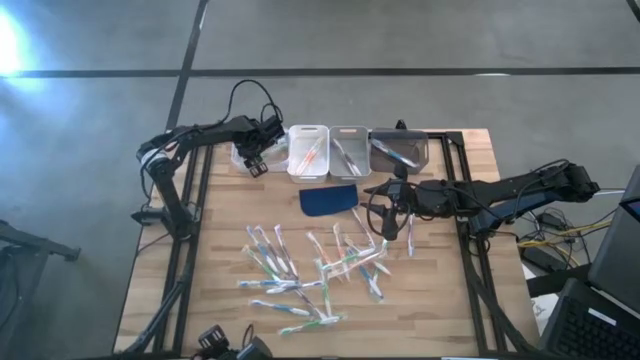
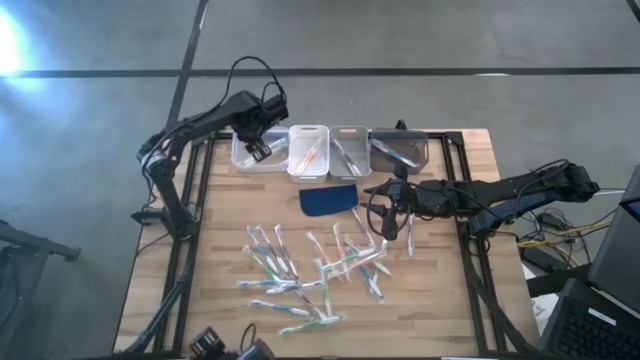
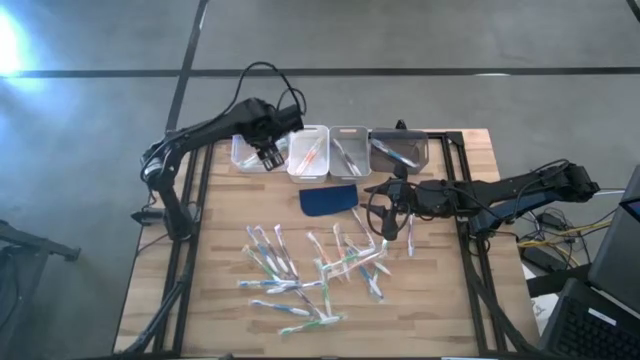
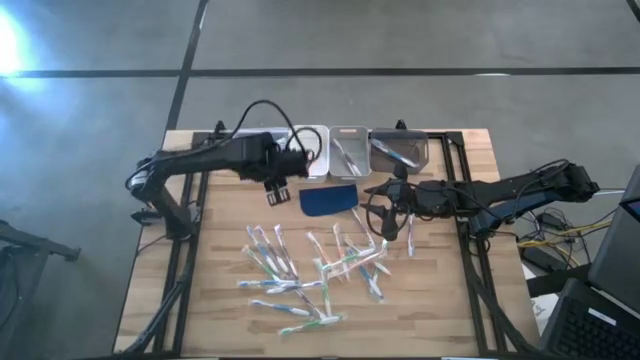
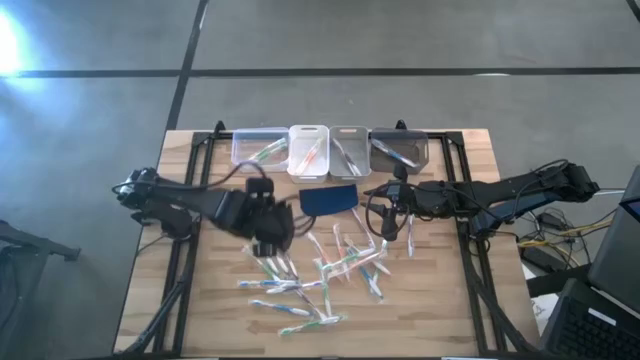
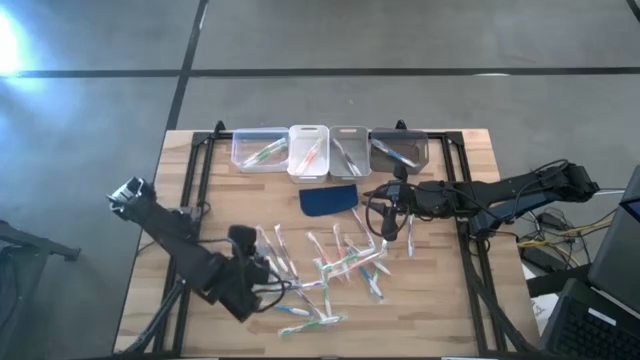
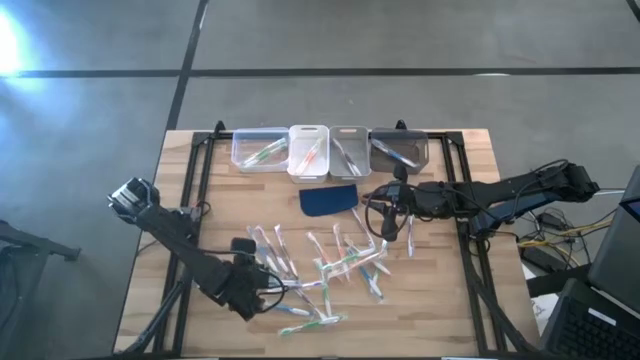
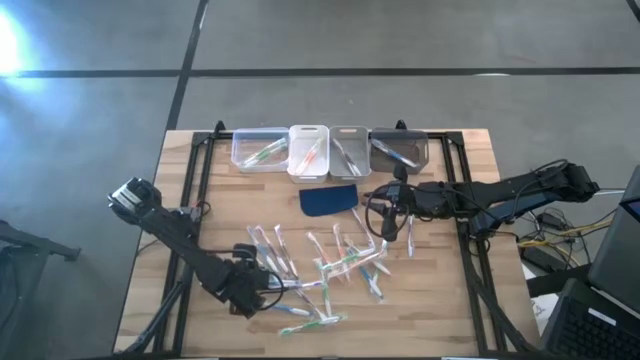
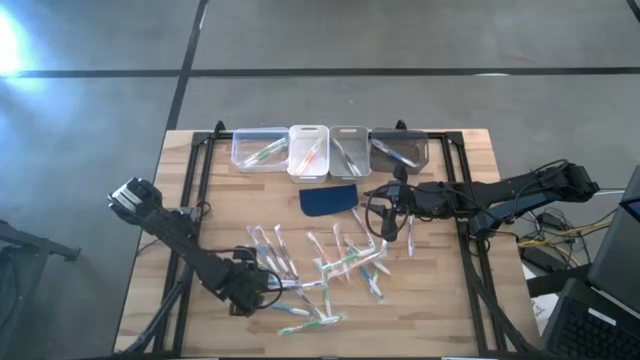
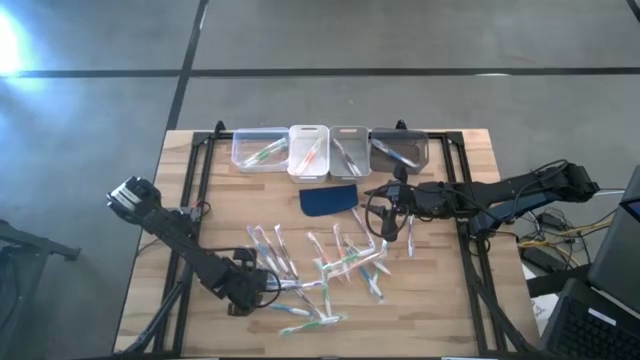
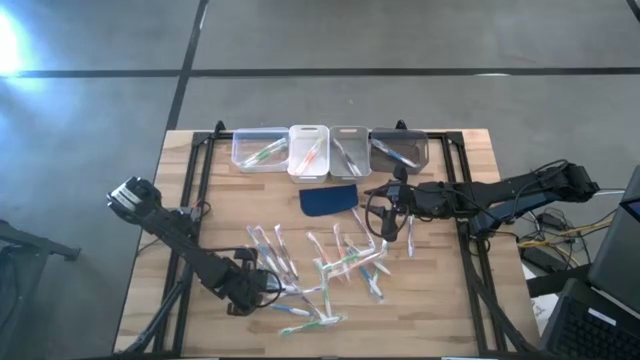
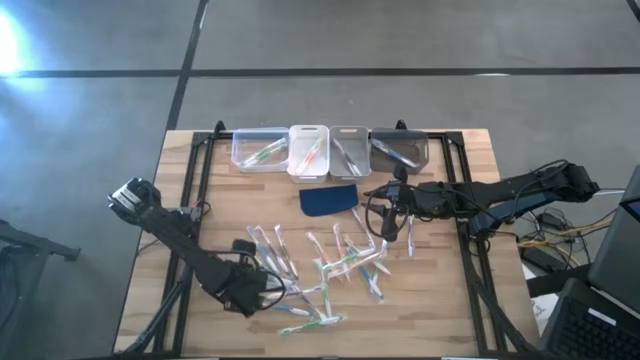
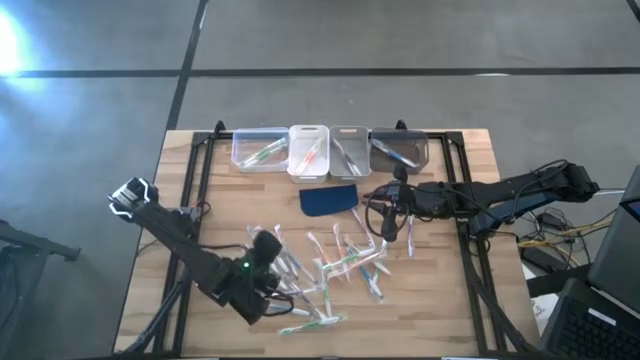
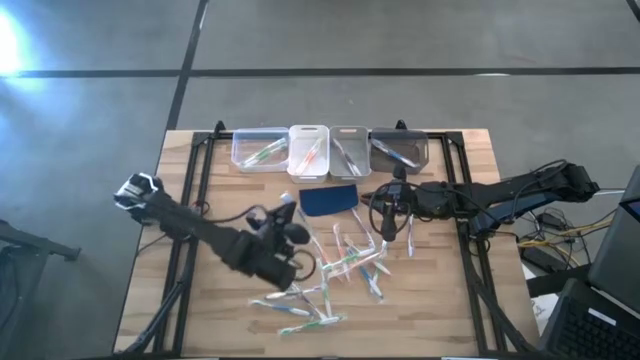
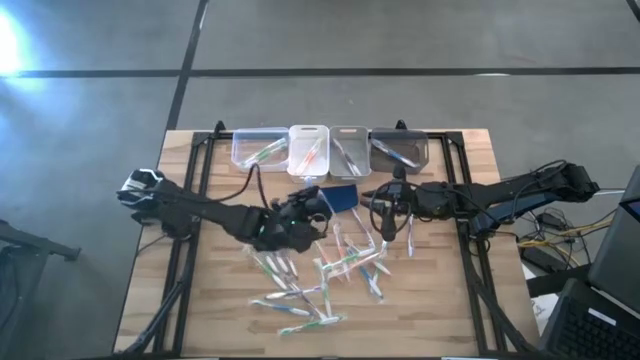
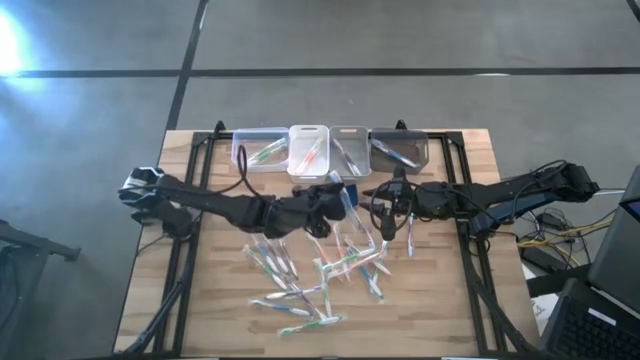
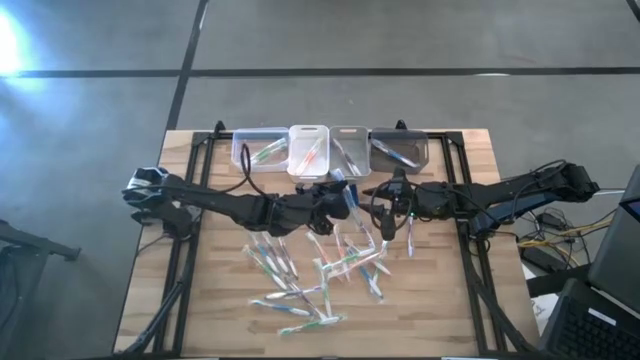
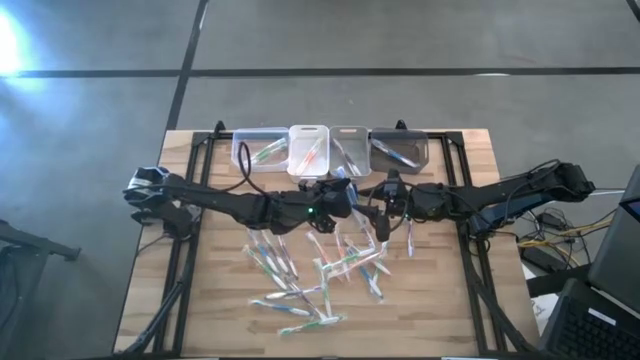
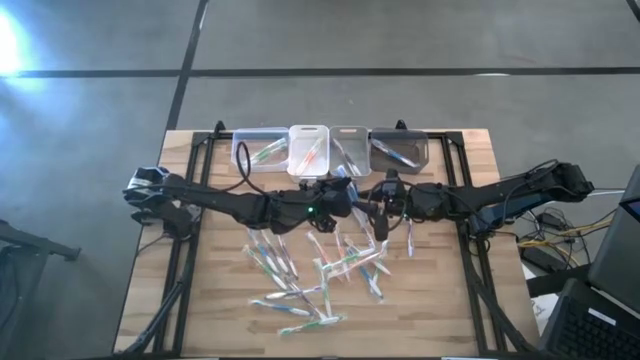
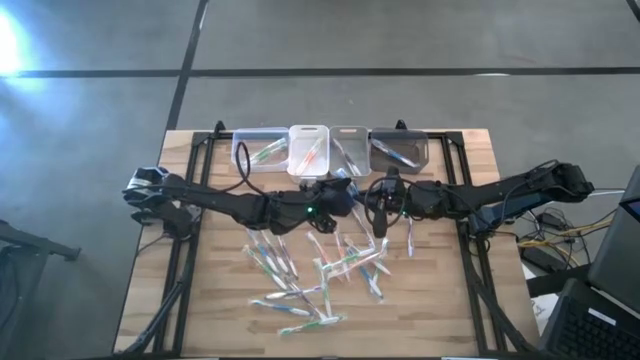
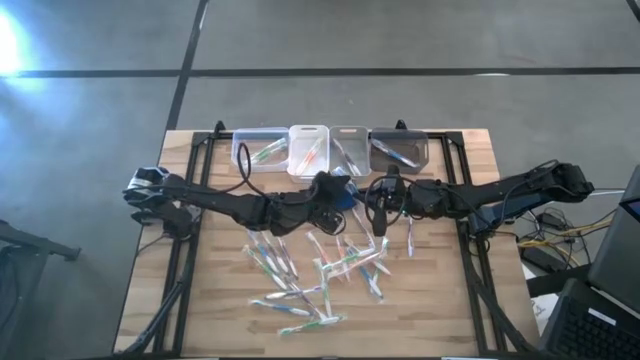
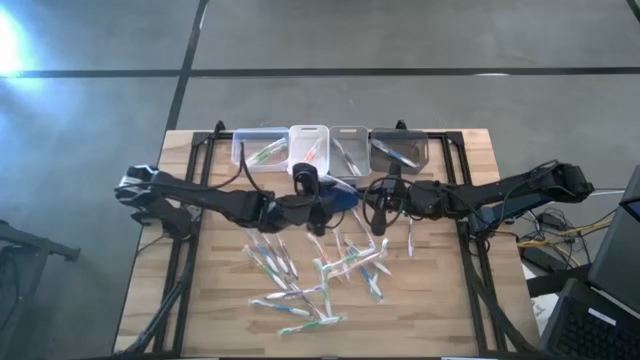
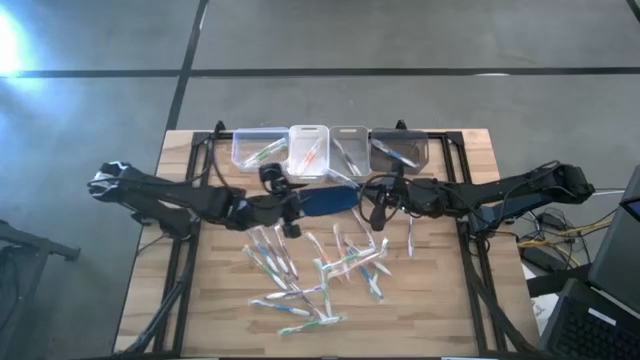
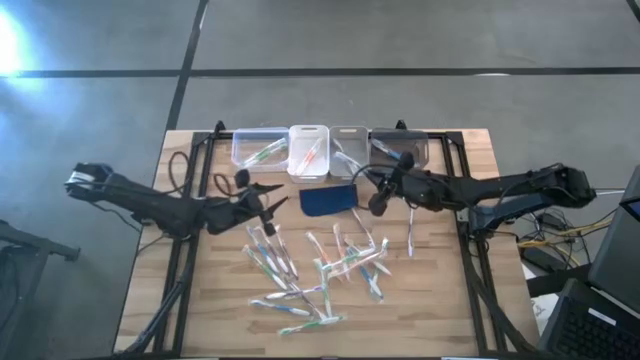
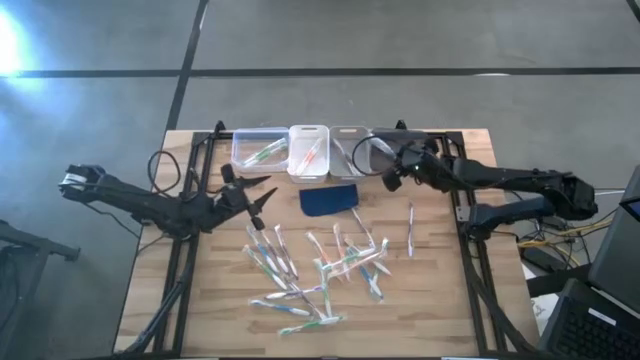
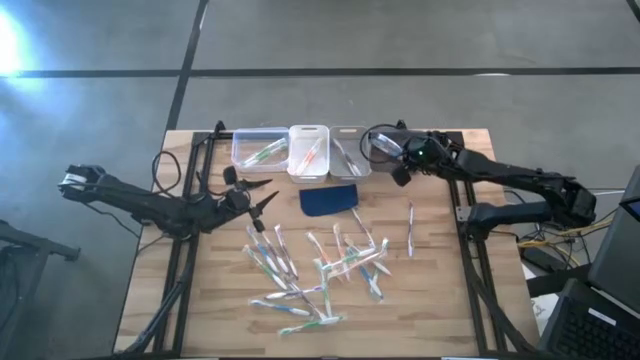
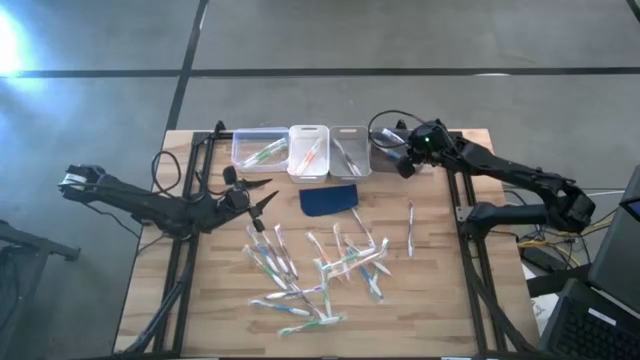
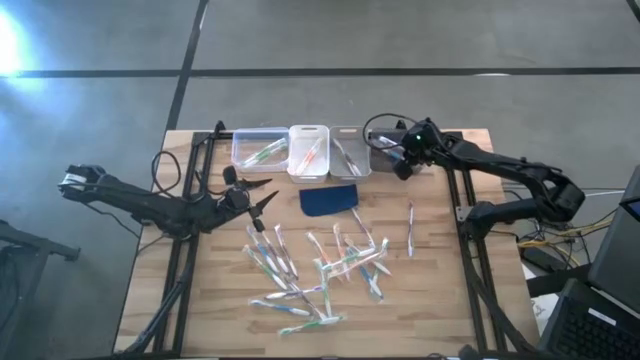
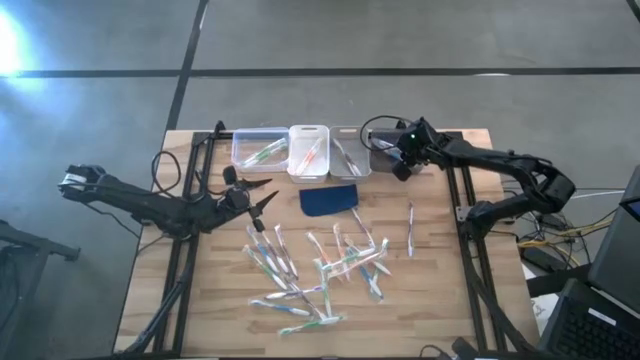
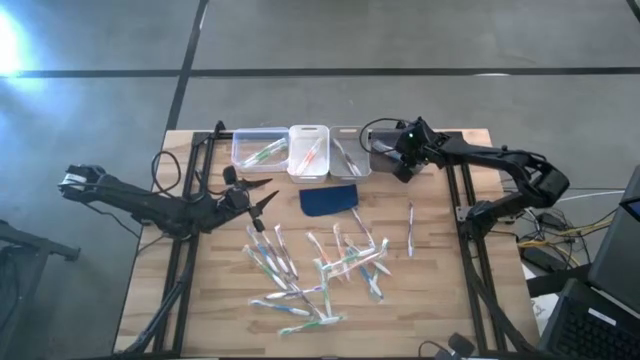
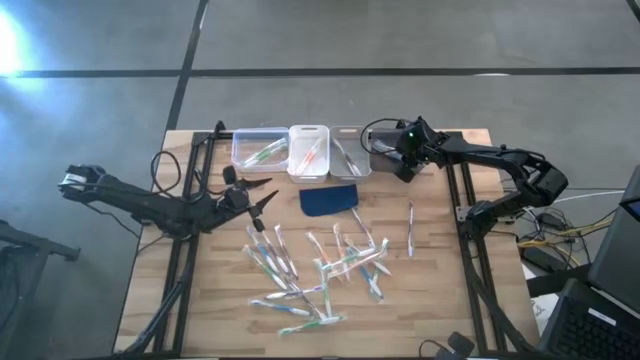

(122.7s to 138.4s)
Task: Pick & Place Toothbrushes
Put the blue toothbrush into the transparent black bin

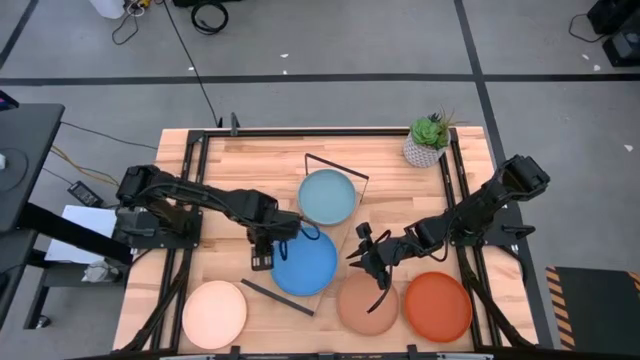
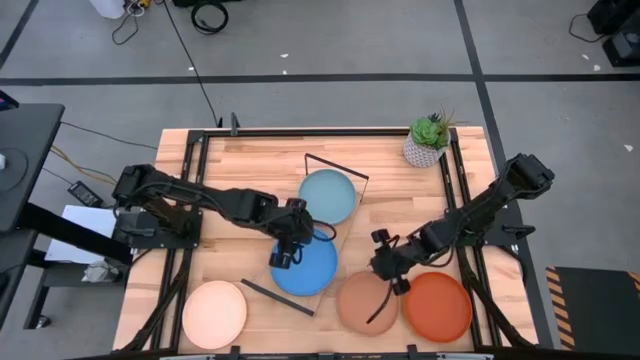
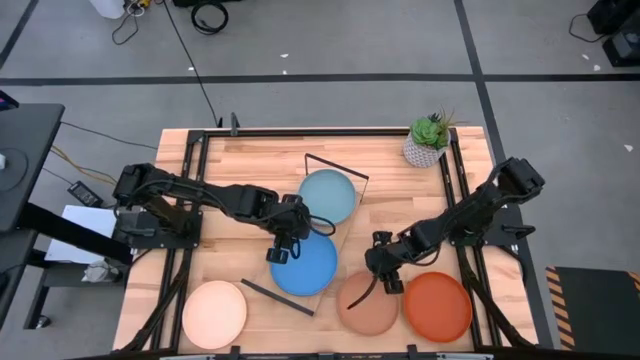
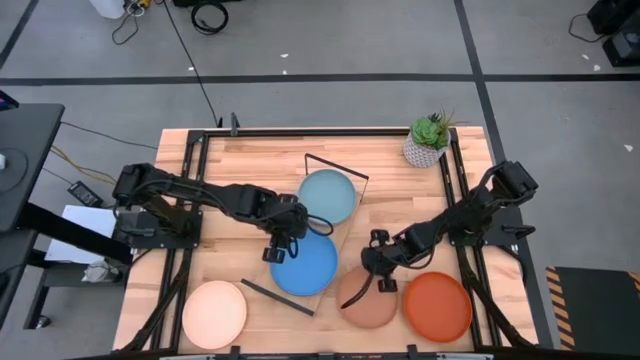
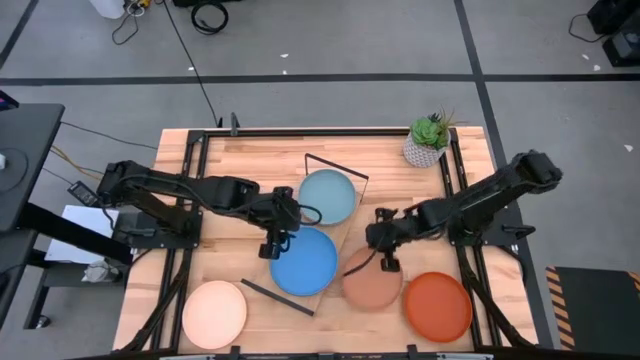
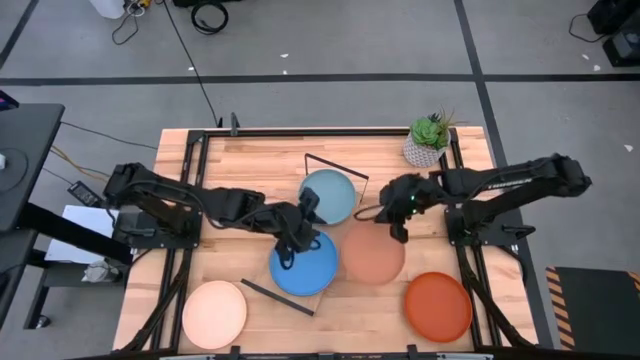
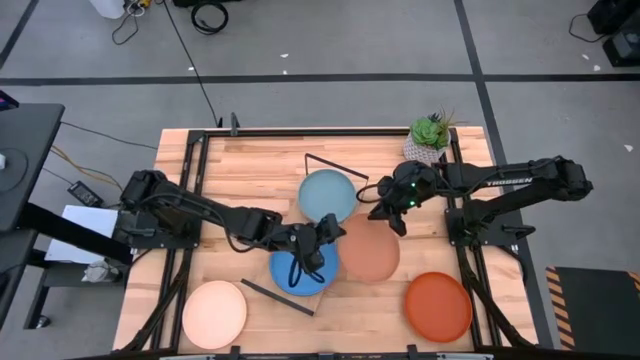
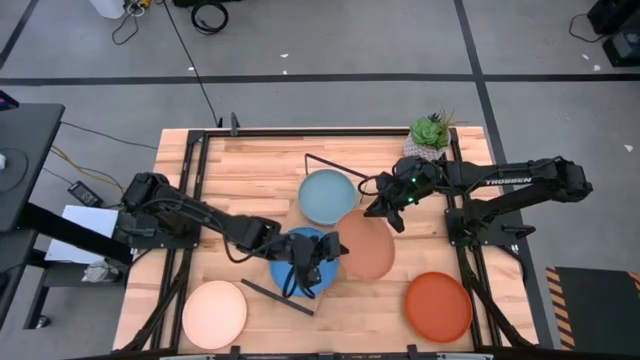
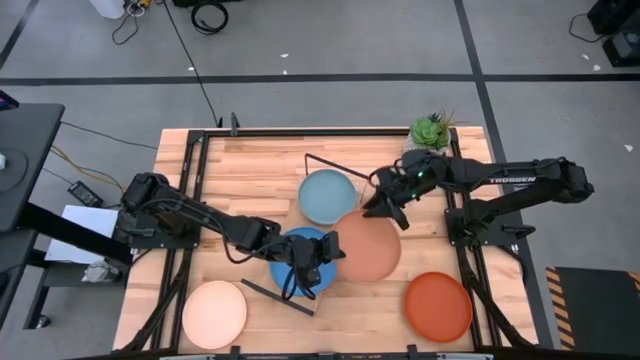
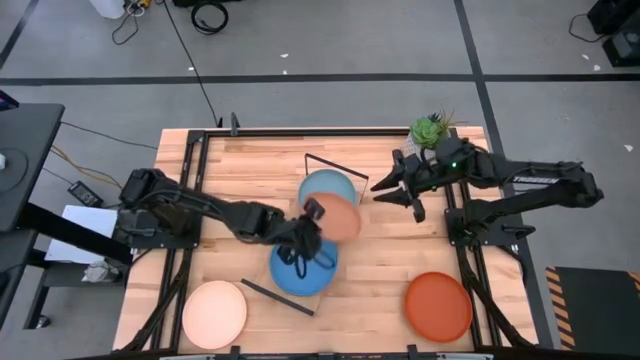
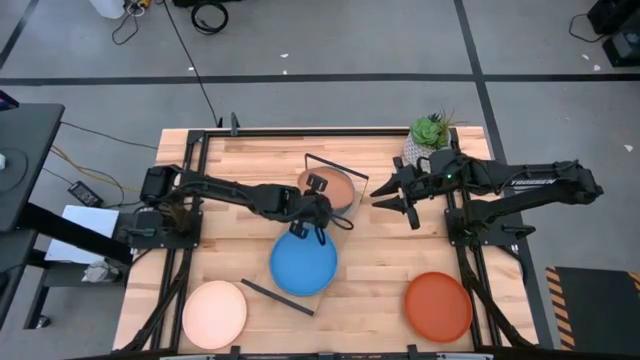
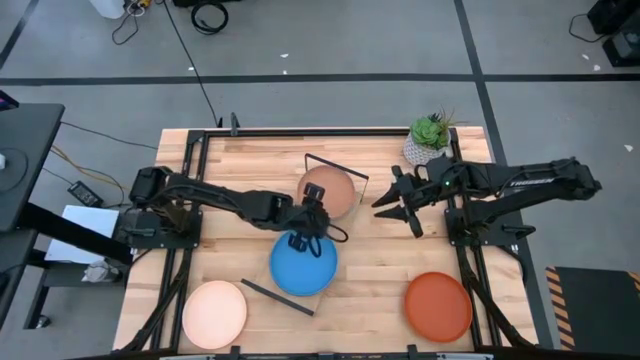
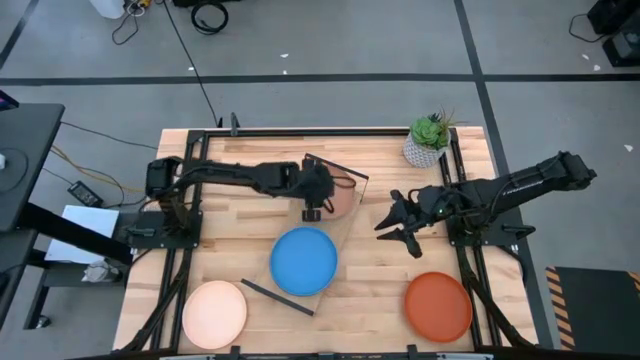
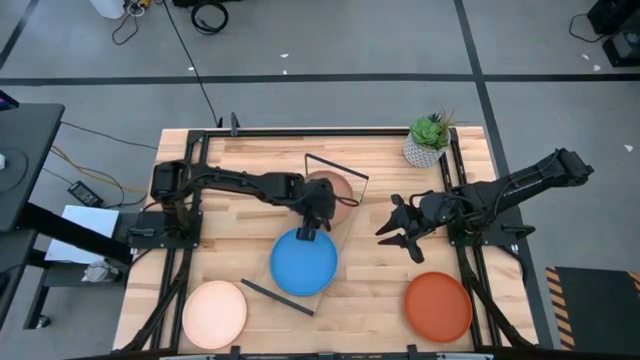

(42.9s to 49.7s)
Task: Place and stack plates onto a shelf
Stack the brown plate on top of the light blue plate
